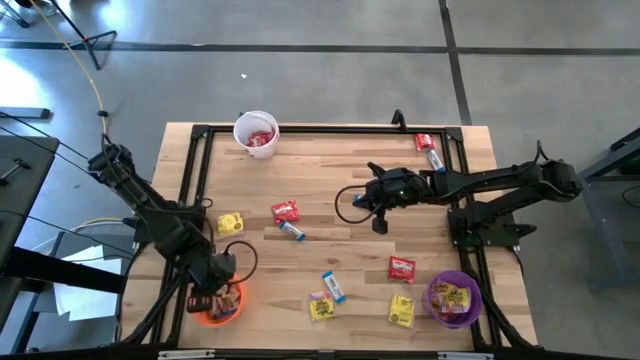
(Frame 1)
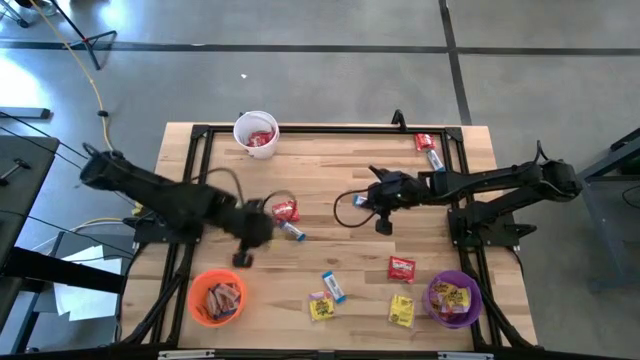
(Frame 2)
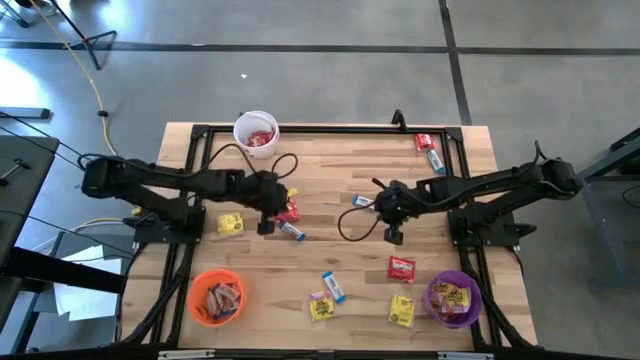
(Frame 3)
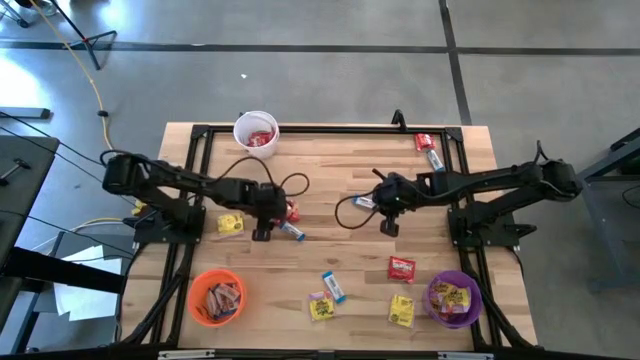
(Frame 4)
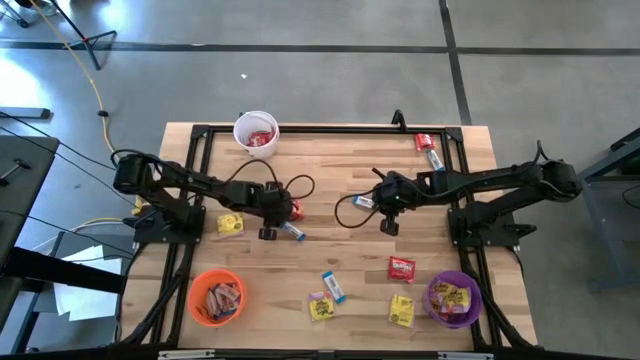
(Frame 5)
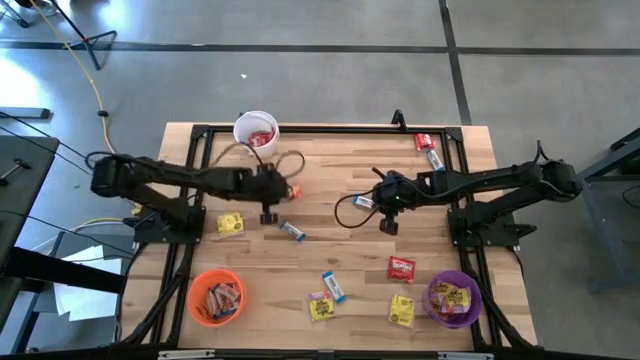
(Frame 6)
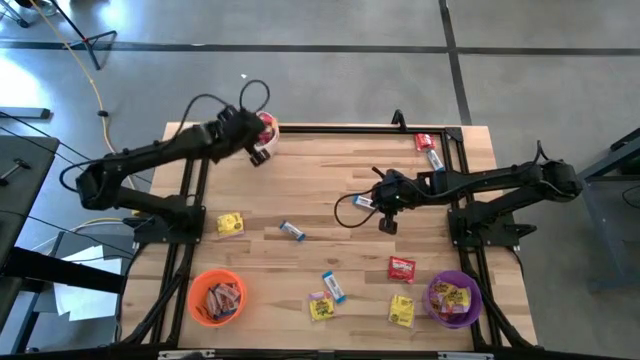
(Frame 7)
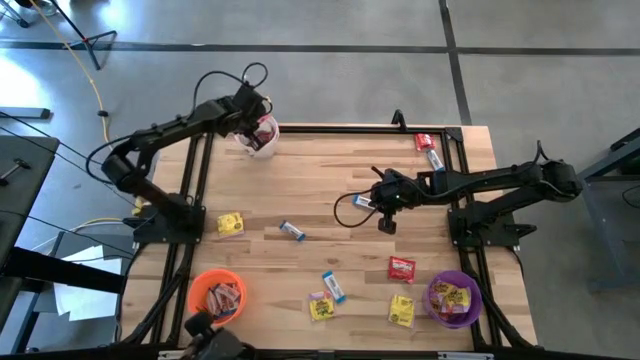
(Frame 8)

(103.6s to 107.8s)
Task: Sort candy
Put the red candy into the white bucket

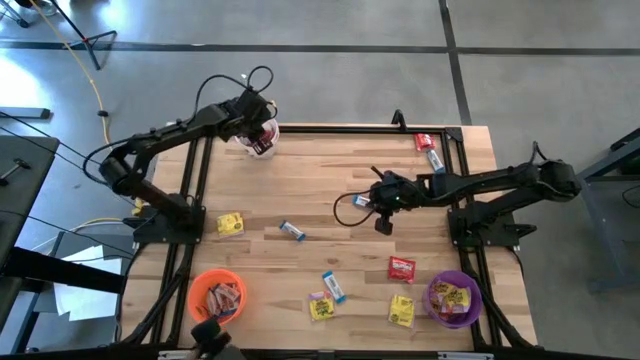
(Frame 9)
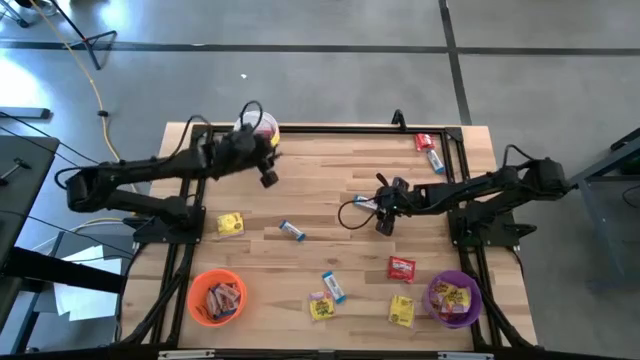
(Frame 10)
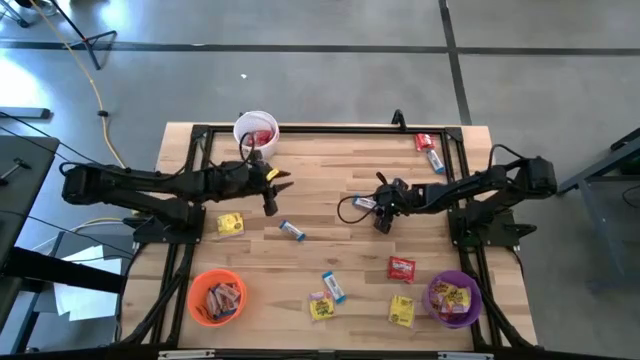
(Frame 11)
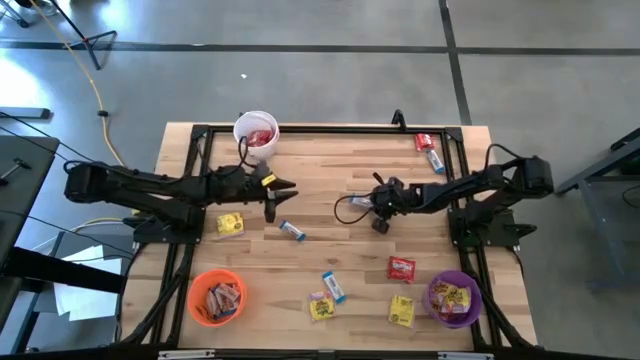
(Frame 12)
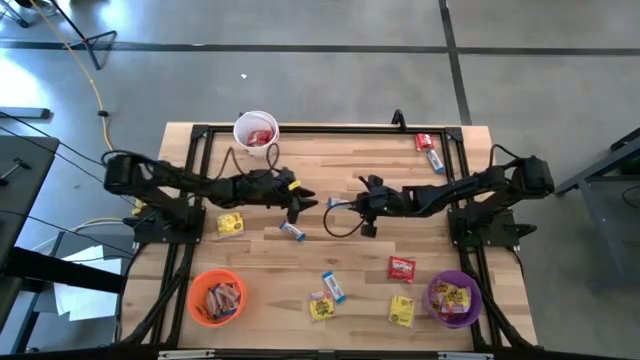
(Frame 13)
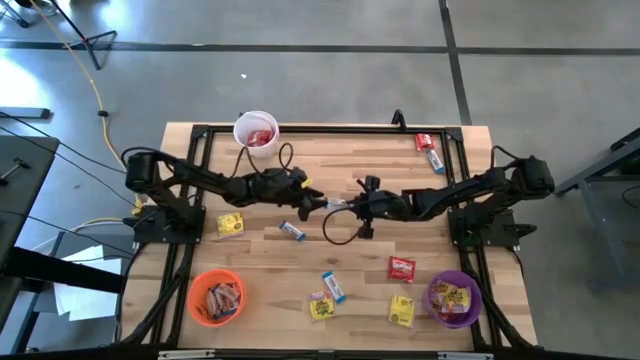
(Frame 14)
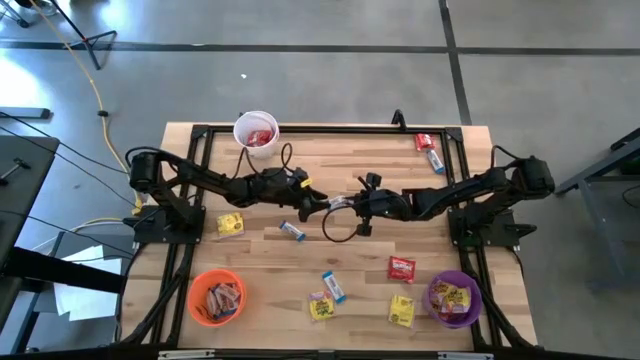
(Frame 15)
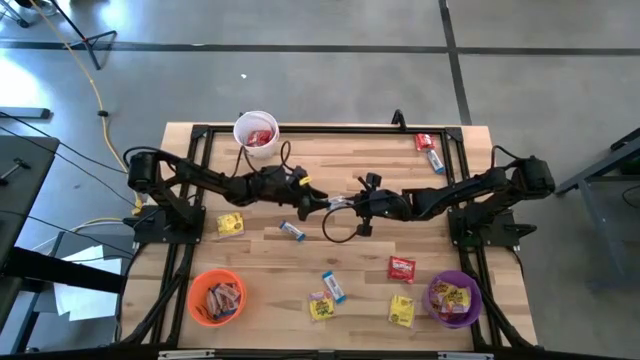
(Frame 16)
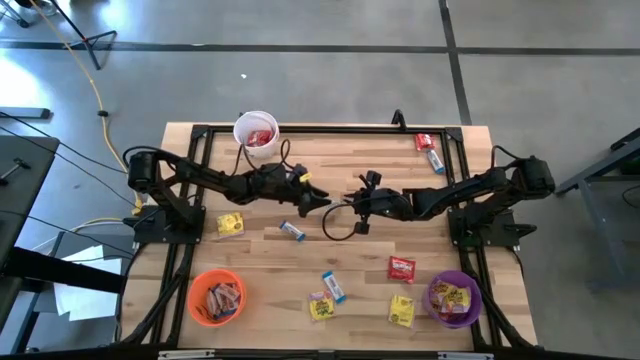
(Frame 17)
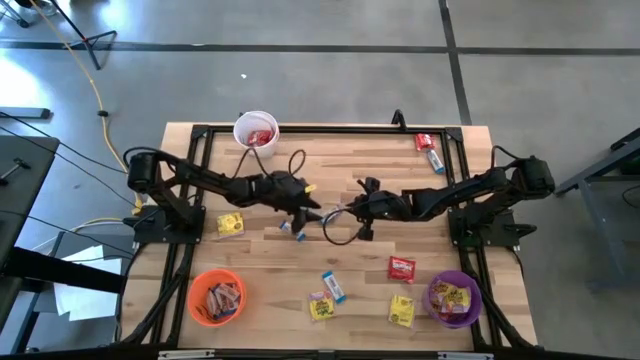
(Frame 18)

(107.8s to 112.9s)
Put the white candy into the orange bucket

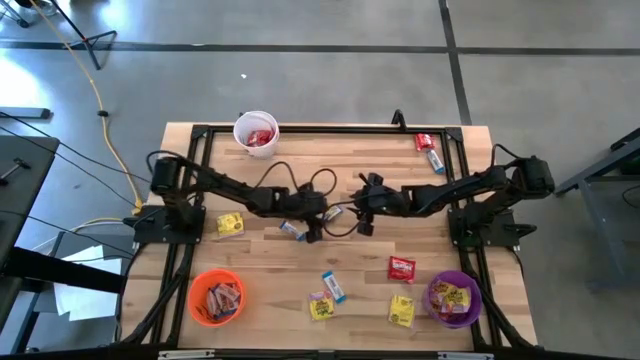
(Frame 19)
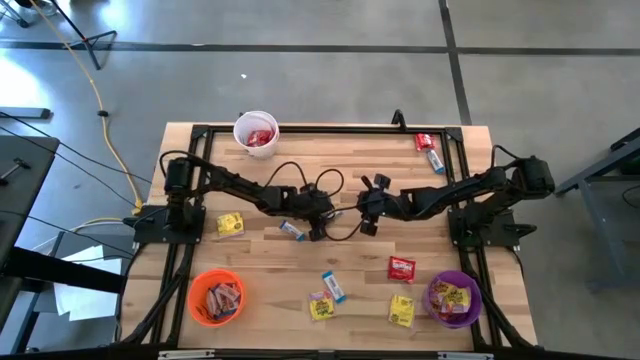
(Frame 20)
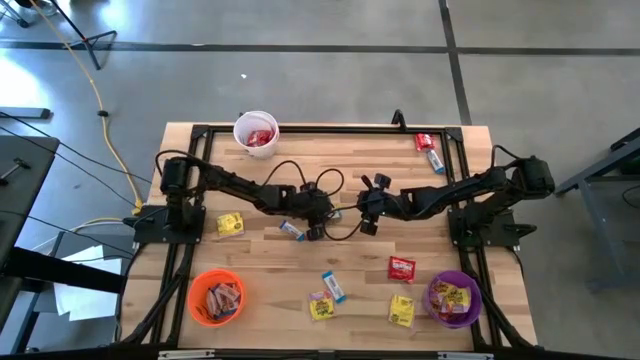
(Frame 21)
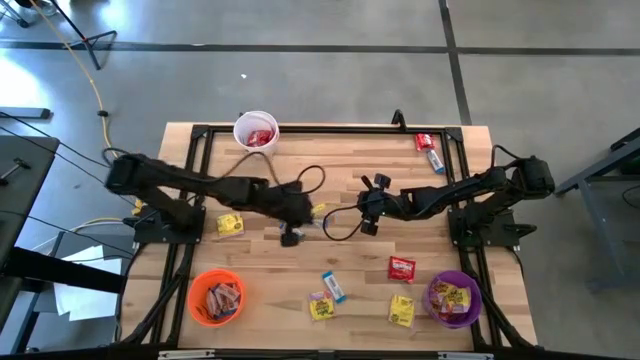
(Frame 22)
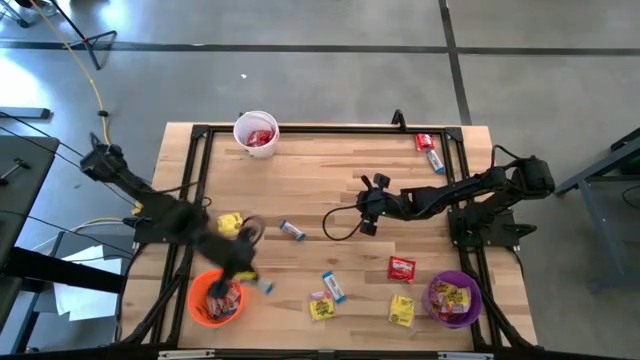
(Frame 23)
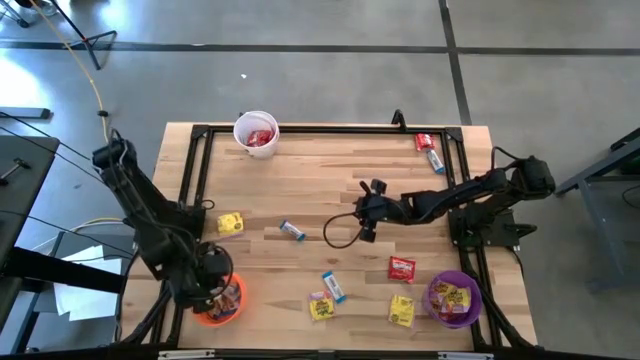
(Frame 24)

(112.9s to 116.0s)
Put the white candy into the orange bucket

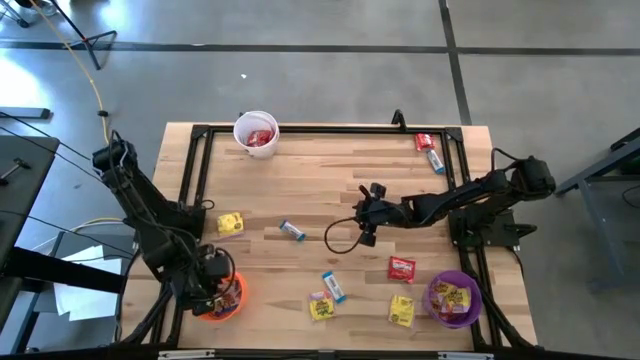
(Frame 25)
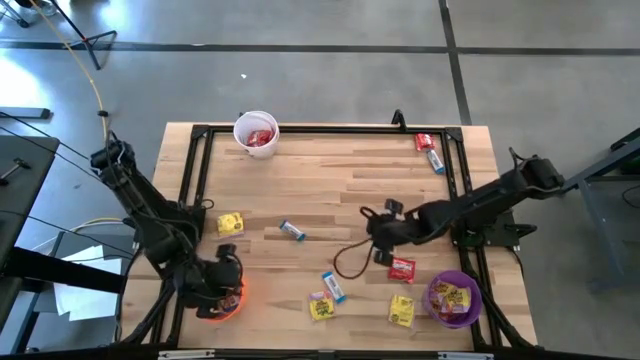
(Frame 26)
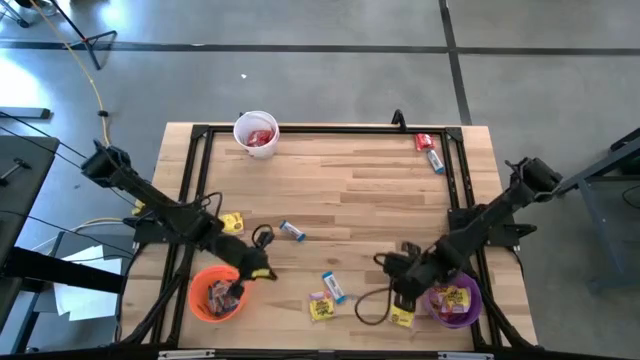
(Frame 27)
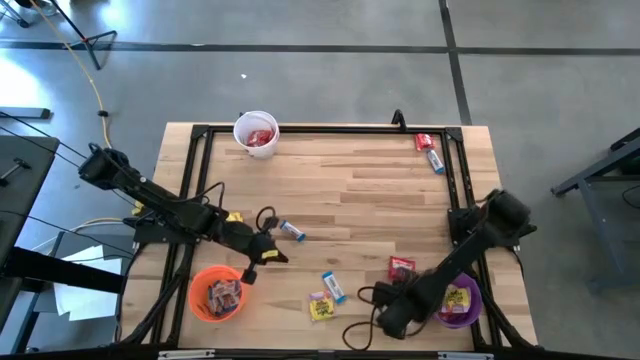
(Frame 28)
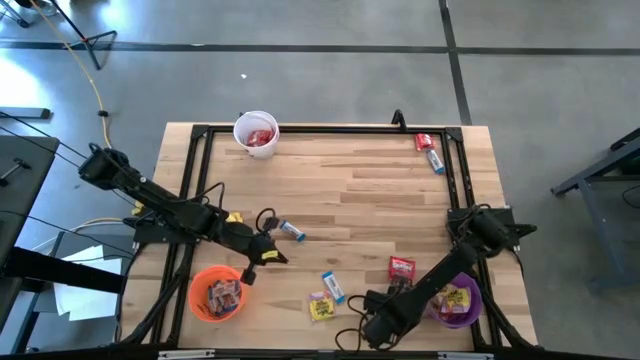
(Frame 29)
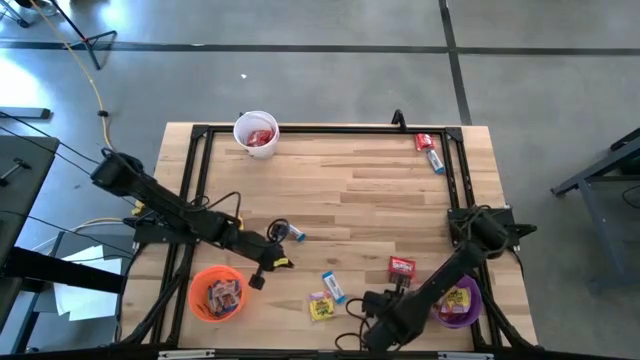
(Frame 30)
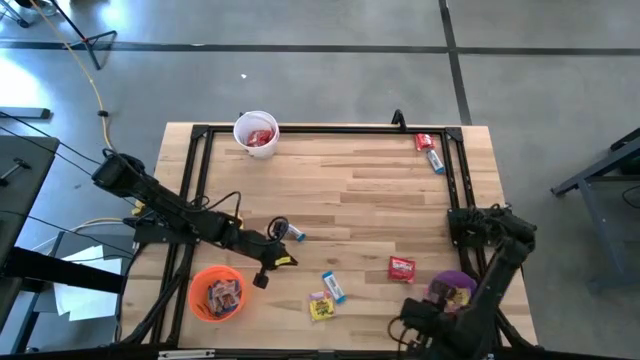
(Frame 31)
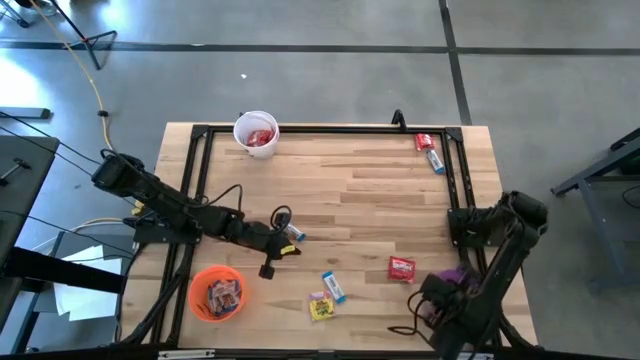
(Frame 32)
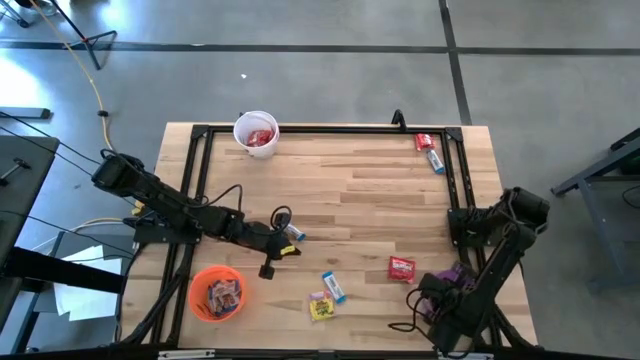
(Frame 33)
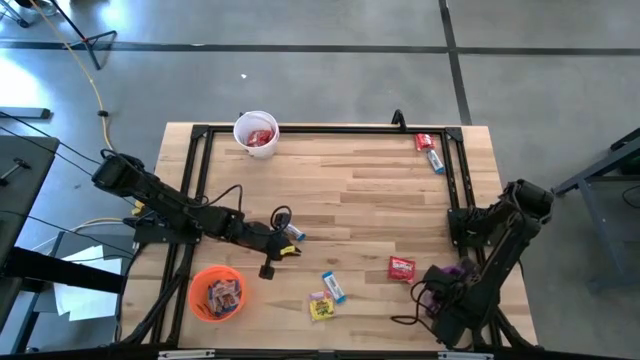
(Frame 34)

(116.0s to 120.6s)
Put the yellow candy into the purple bucket

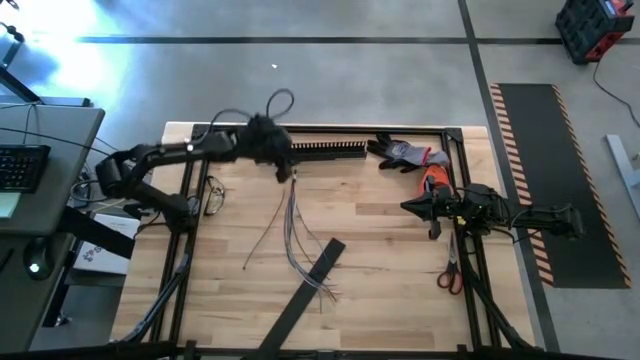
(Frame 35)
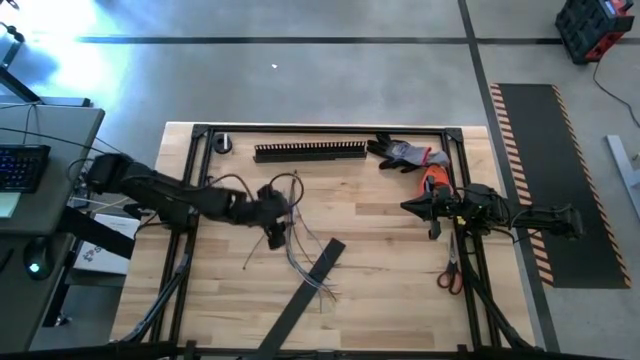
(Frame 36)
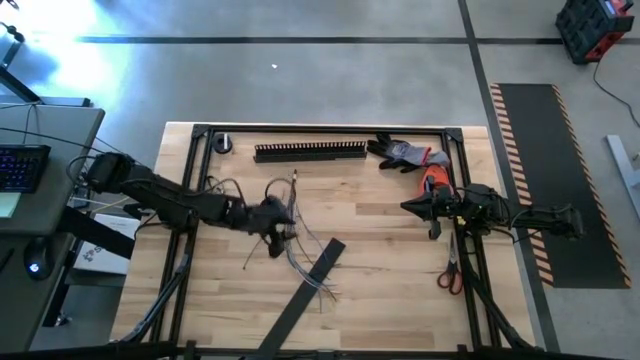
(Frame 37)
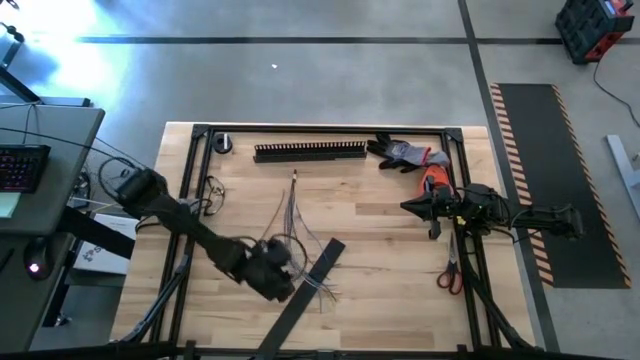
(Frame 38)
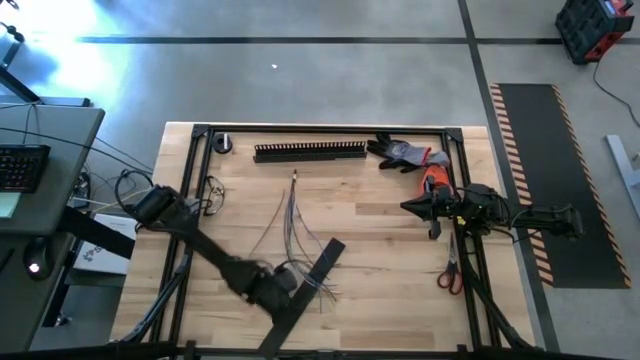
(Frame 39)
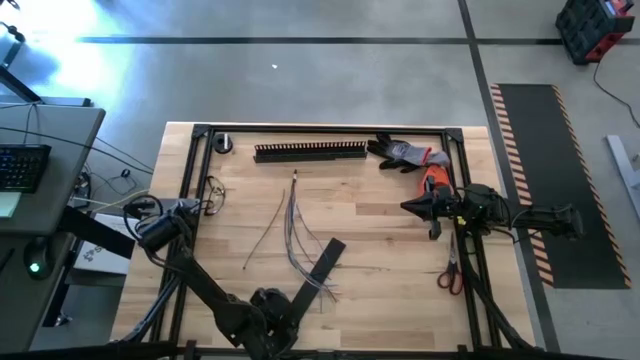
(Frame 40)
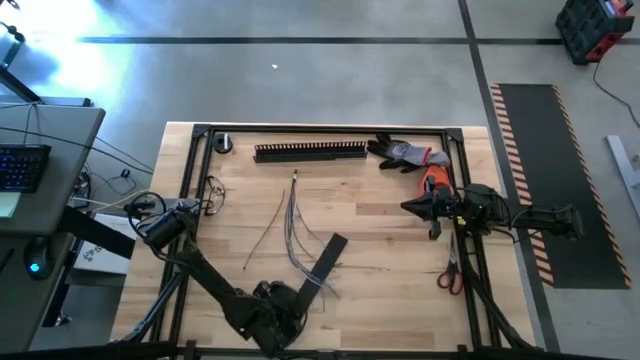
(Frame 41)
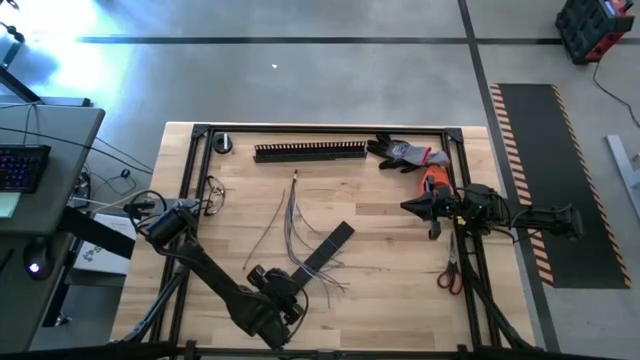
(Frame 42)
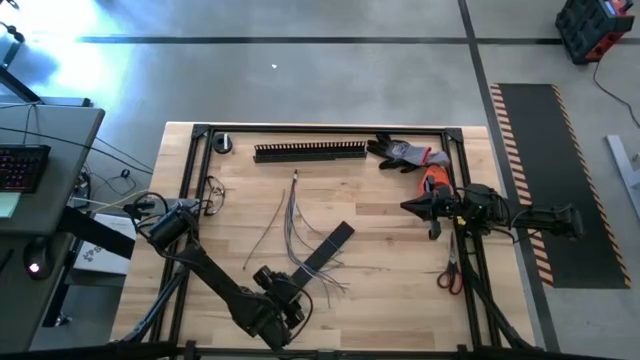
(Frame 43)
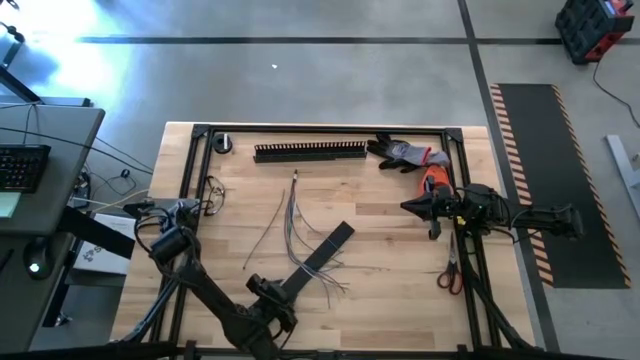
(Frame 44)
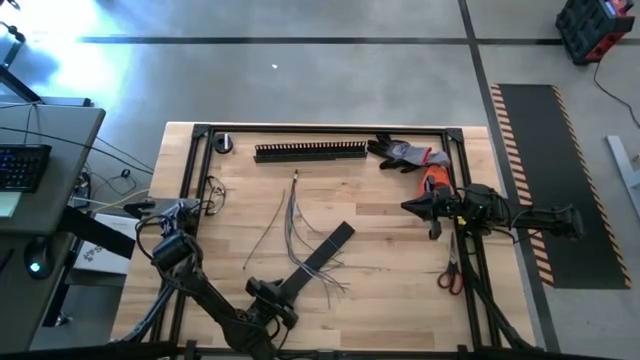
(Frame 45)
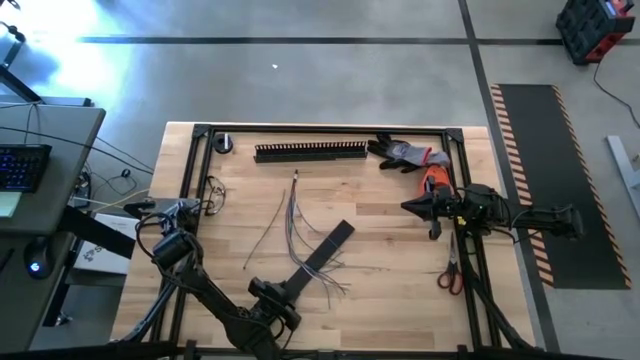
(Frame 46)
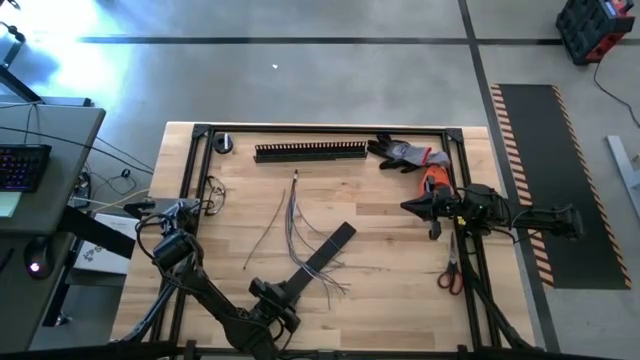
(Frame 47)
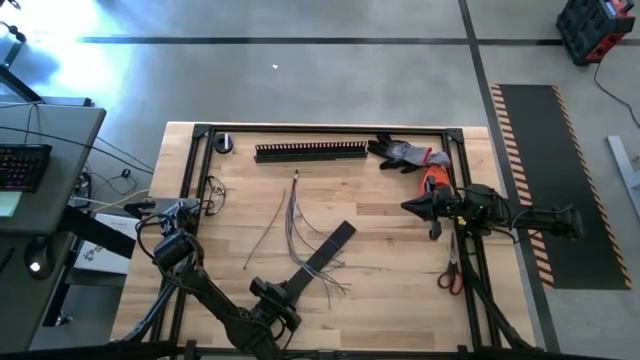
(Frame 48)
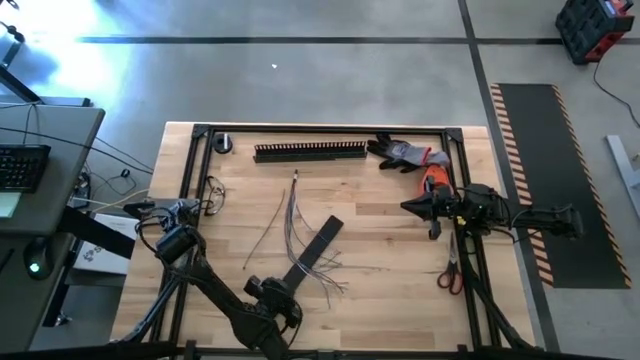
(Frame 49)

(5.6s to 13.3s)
Task: Ziptie cables
Move the black cable duct lid to the top right of the table
